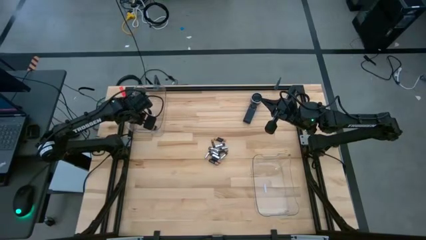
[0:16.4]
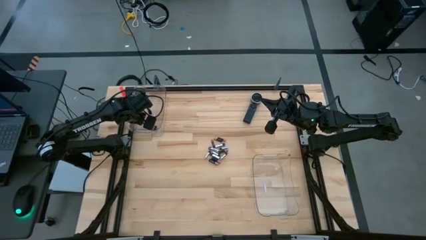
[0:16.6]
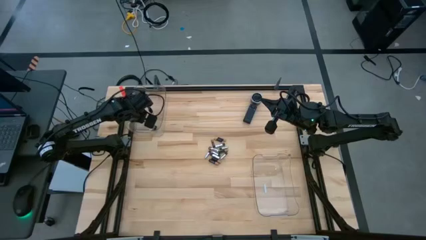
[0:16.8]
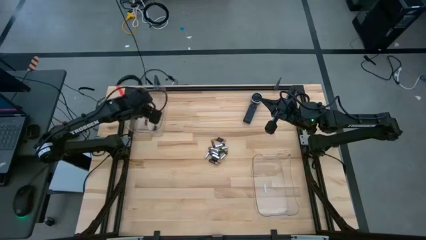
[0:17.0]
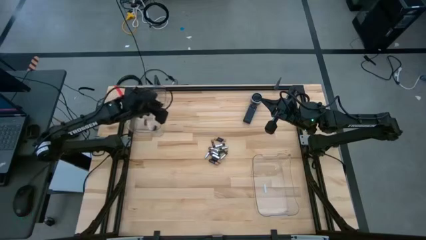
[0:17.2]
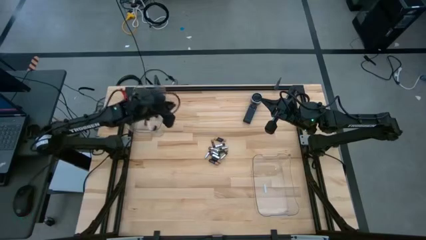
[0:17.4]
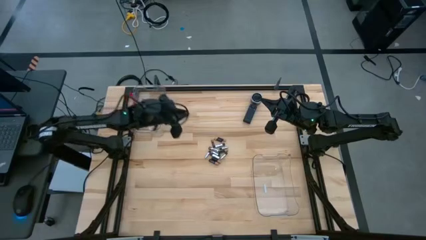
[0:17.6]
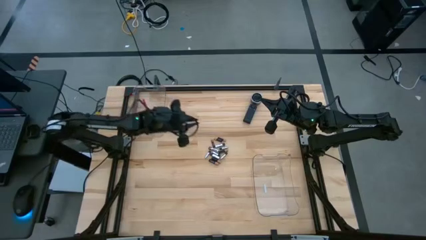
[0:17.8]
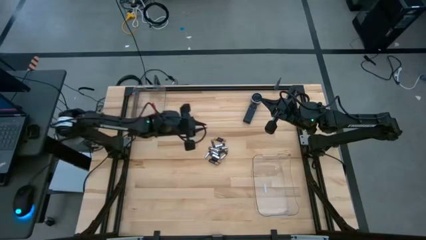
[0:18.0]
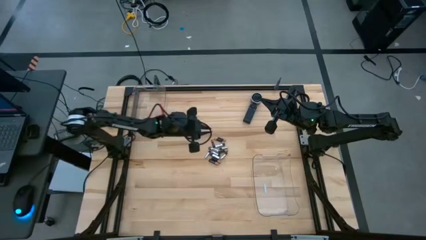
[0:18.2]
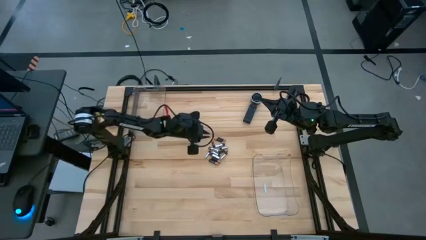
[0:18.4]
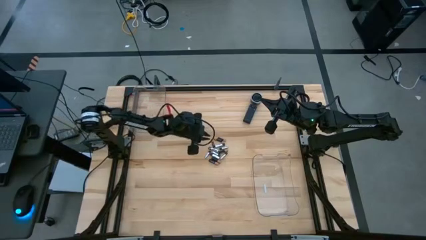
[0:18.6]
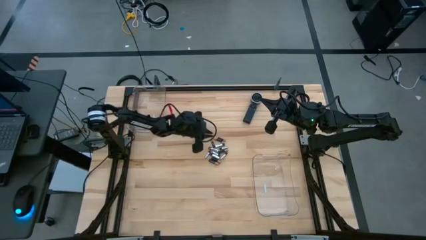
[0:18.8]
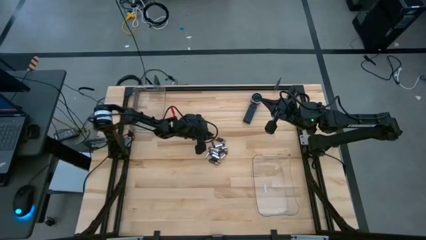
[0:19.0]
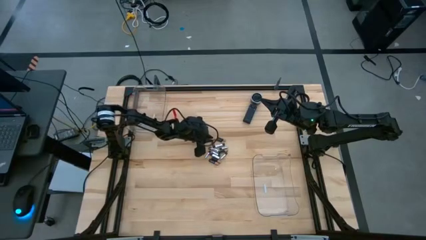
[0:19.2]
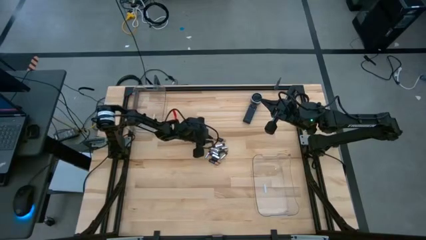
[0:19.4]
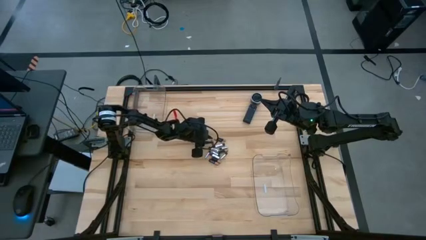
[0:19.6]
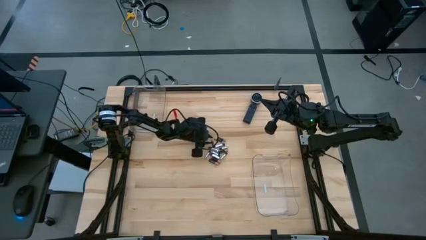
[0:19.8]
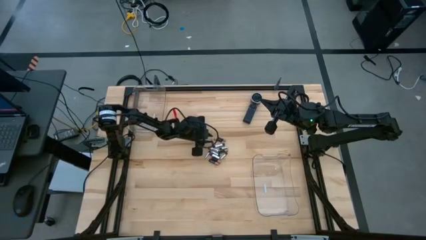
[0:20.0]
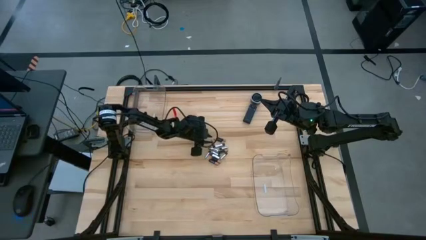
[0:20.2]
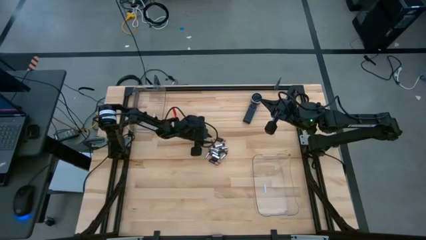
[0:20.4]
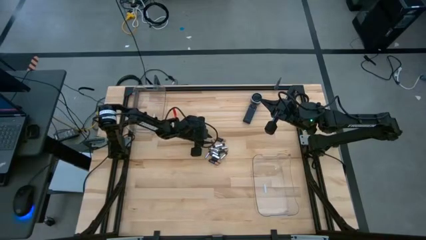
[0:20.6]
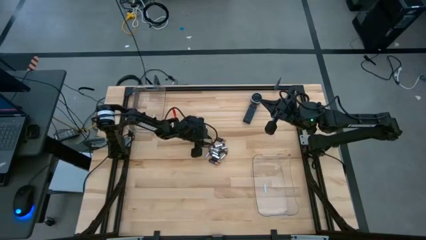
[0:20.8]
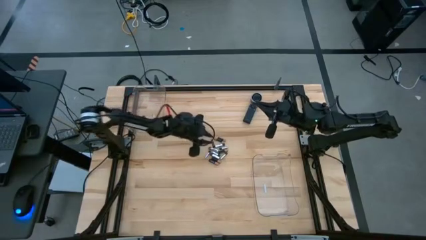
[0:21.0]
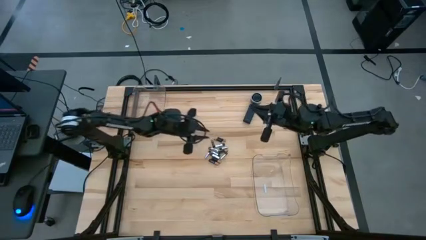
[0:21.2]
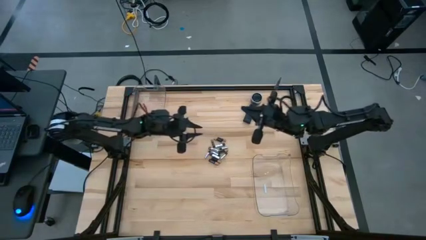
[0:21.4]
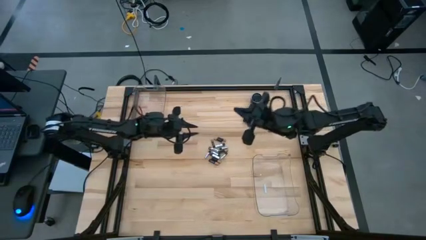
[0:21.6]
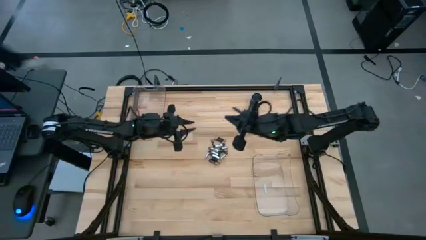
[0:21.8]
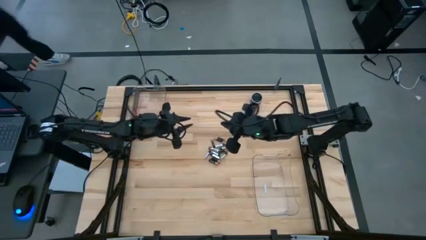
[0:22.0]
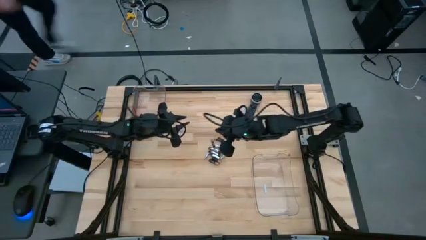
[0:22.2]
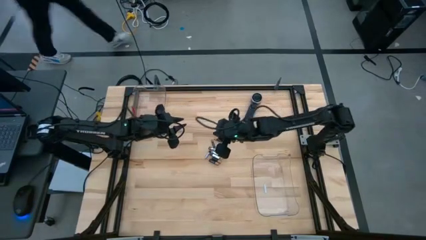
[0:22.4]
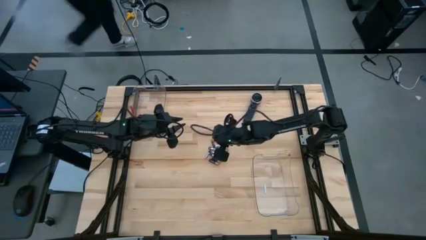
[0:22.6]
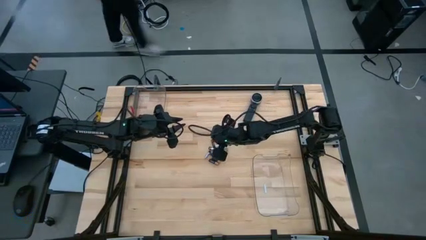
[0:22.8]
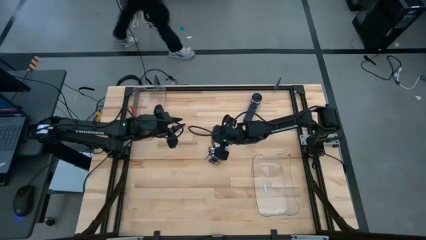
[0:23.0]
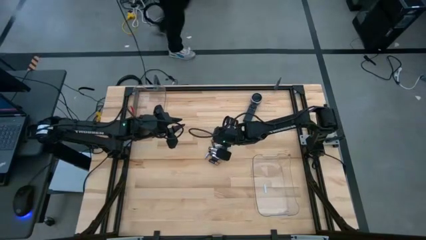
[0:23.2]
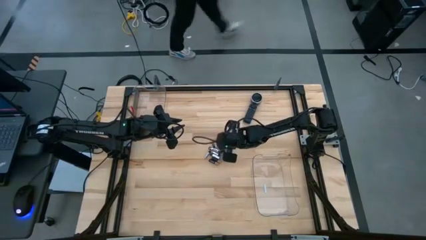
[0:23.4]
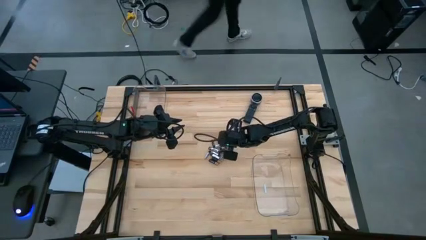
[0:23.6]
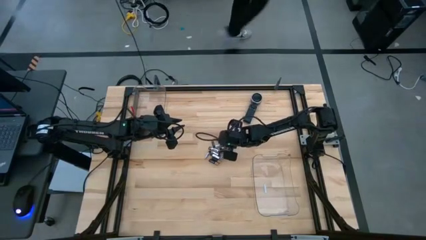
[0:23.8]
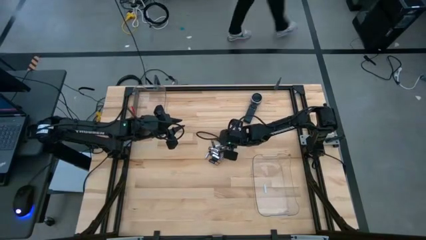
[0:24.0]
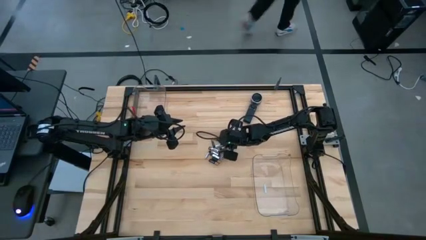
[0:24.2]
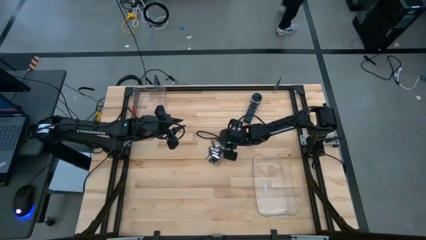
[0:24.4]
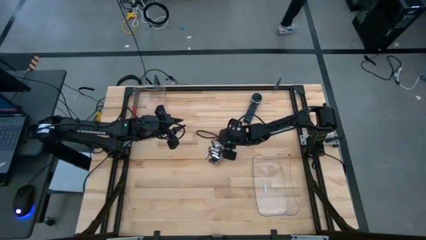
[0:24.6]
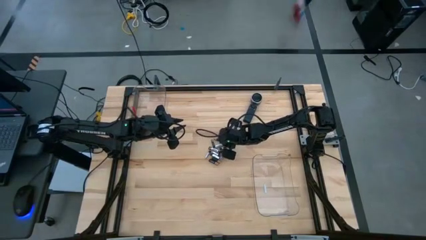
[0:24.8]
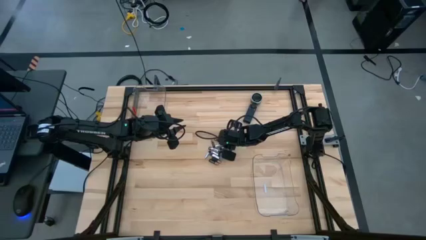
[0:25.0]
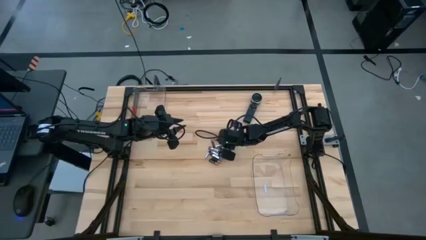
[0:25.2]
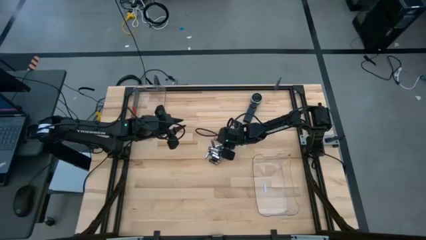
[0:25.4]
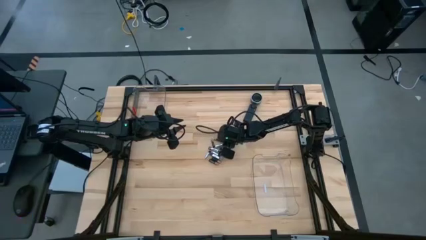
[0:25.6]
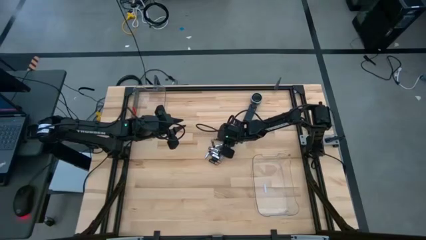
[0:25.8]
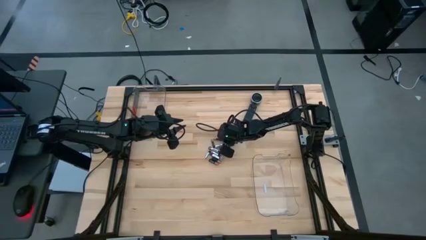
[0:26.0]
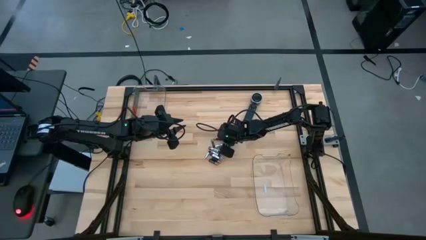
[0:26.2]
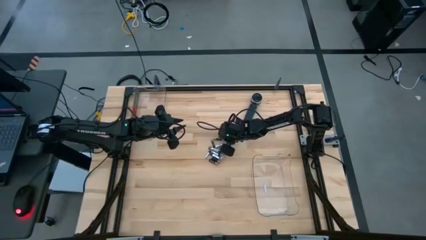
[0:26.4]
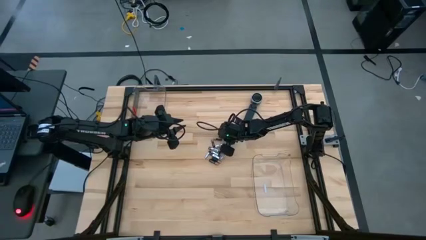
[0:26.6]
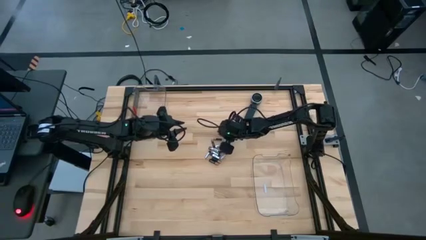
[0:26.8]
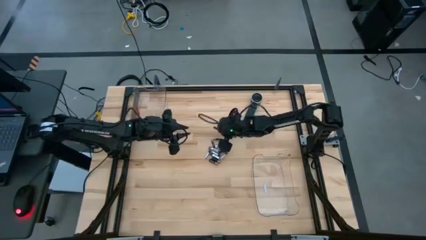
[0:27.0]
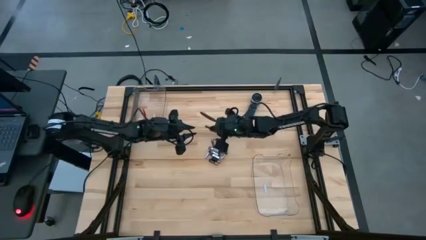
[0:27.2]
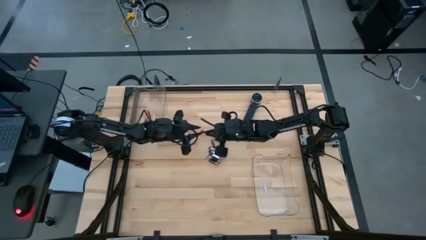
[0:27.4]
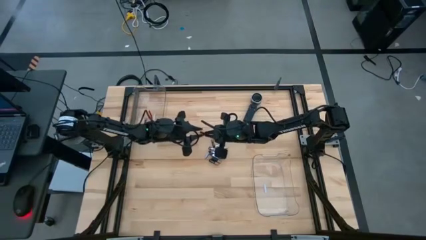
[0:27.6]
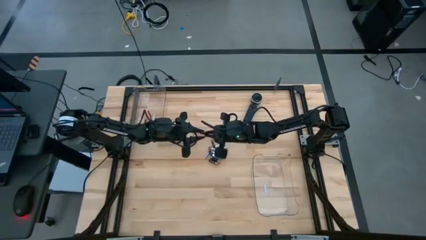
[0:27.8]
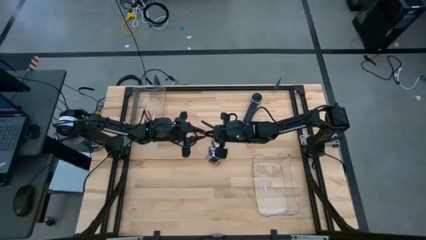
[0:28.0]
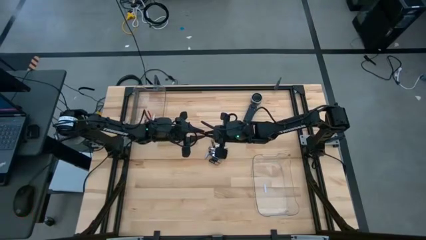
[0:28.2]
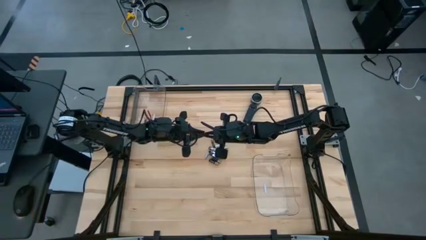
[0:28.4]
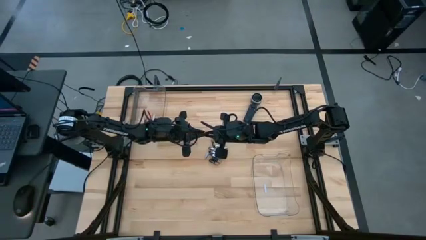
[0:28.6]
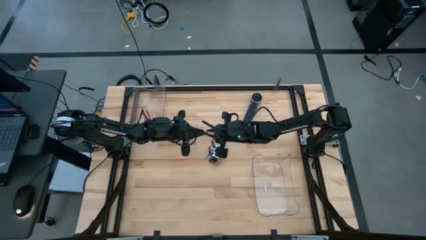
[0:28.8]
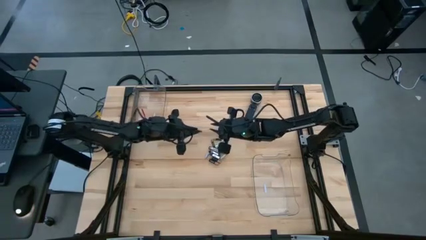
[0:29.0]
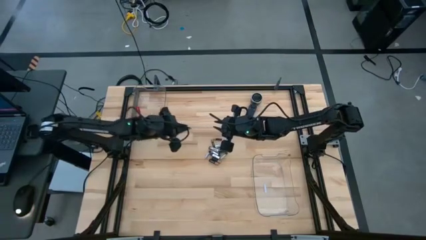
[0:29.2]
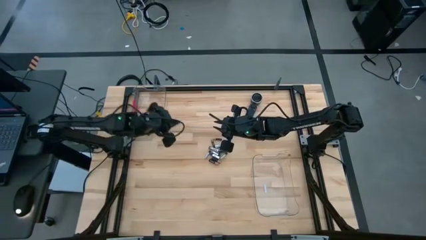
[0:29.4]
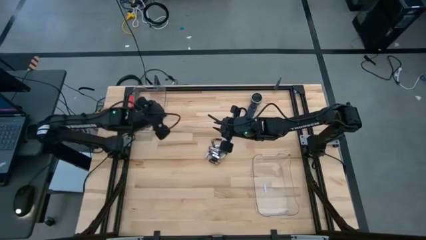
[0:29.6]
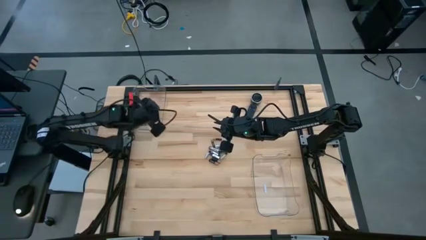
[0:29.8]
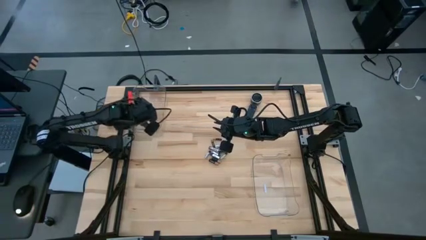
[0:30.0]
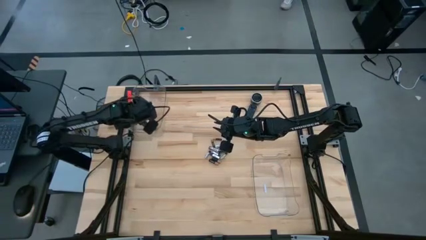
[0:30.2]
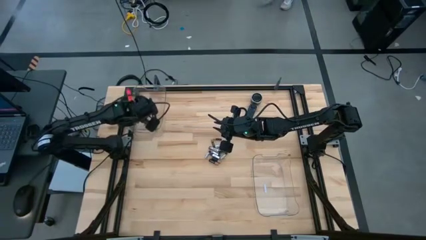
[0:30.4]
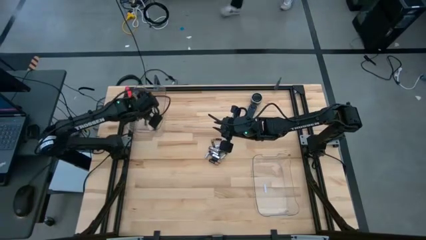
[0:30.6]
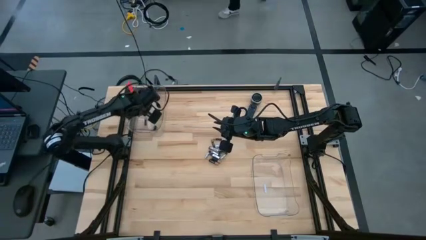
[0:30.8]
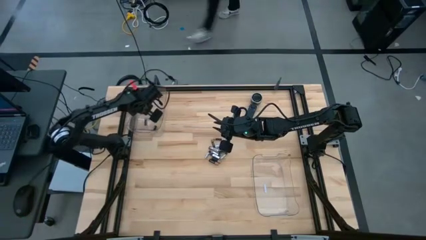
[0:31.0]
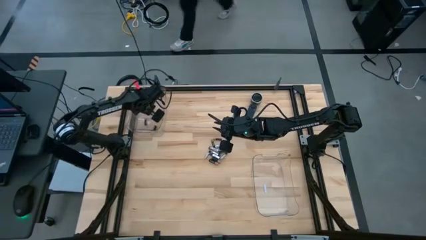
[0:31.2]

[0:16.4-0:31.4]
Task: Sort batteries
Put the black battery into the top transparent bin
